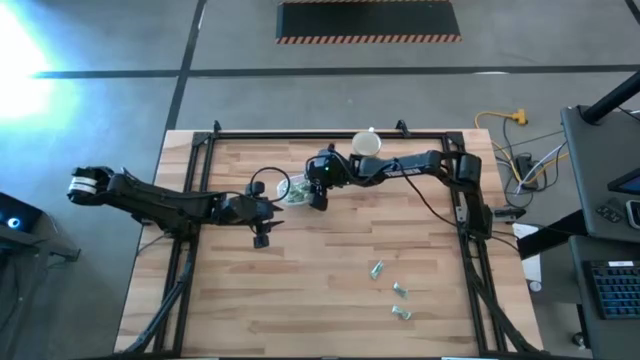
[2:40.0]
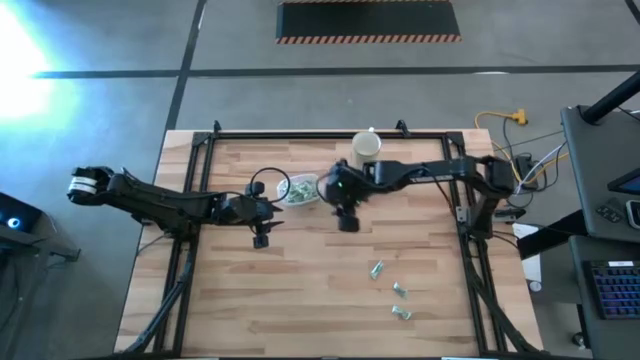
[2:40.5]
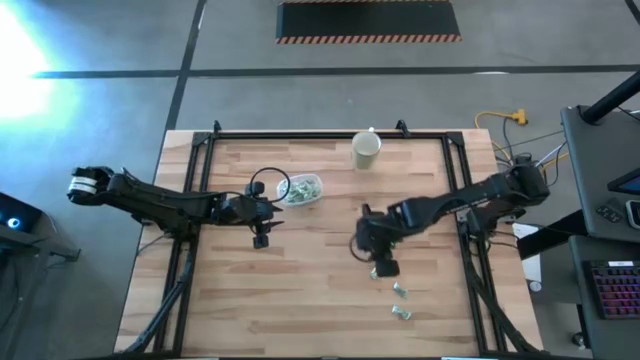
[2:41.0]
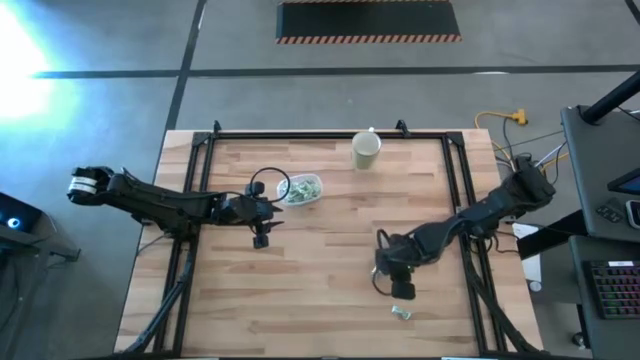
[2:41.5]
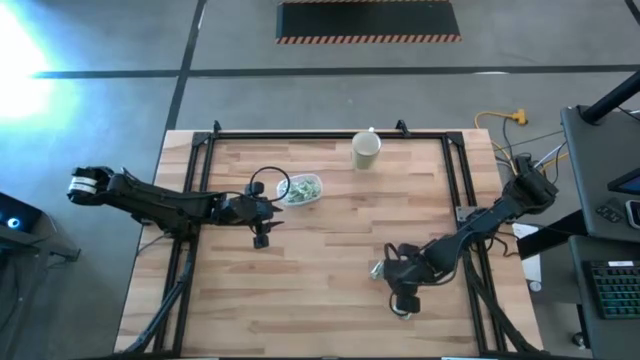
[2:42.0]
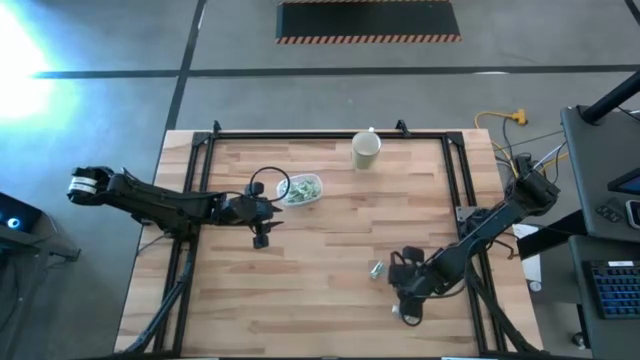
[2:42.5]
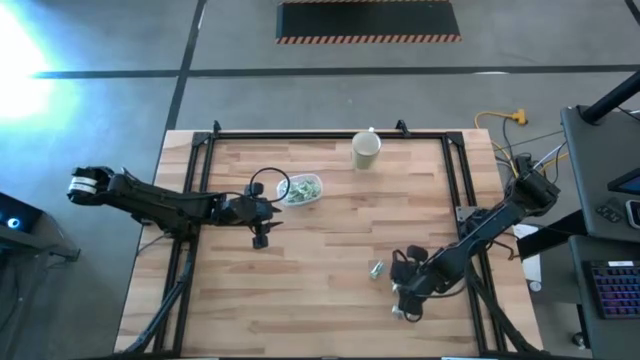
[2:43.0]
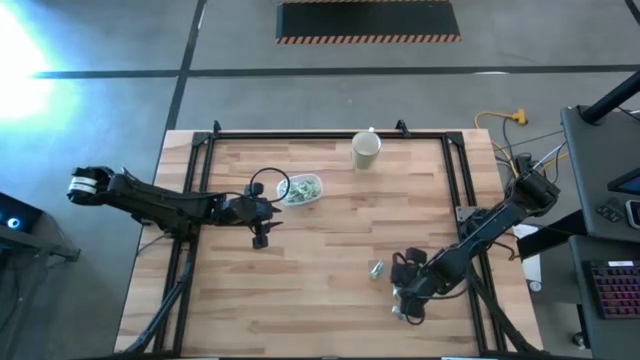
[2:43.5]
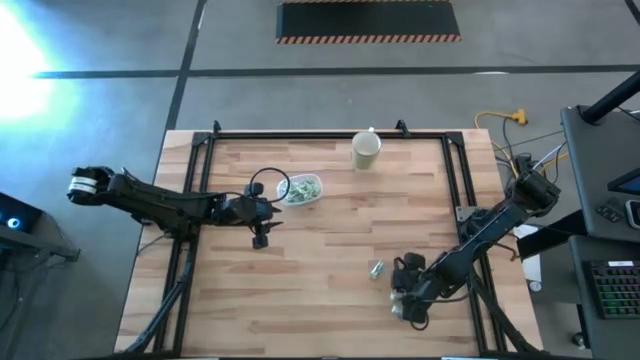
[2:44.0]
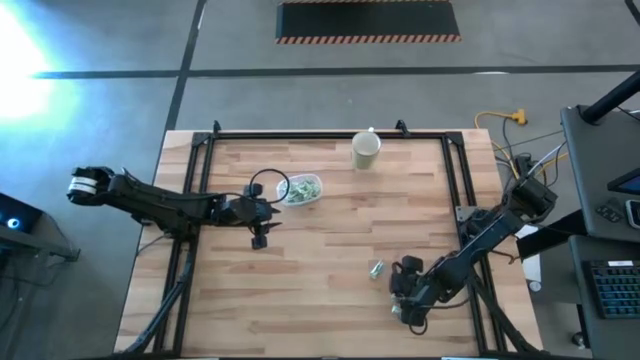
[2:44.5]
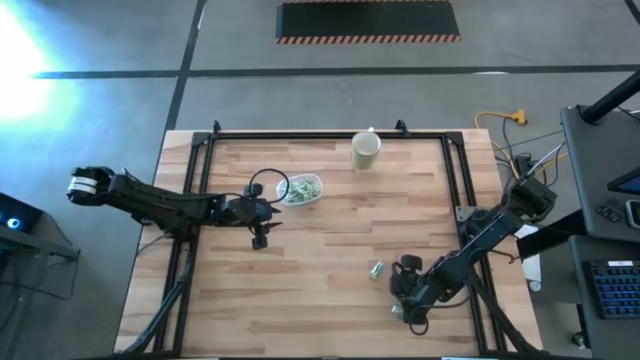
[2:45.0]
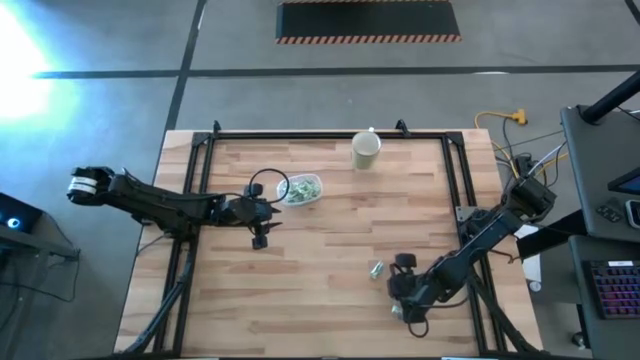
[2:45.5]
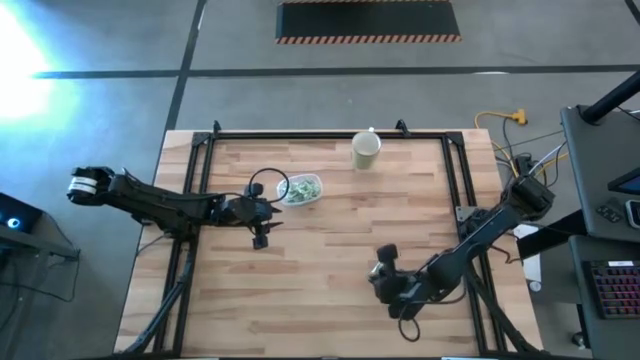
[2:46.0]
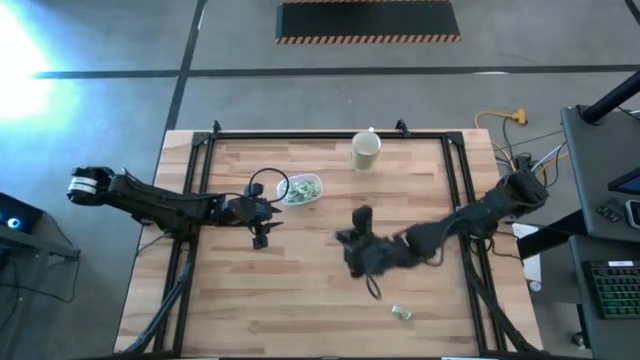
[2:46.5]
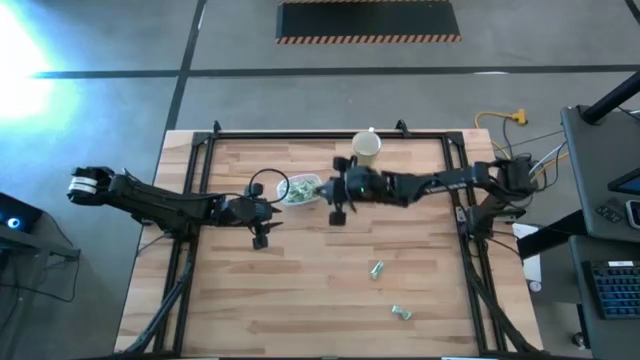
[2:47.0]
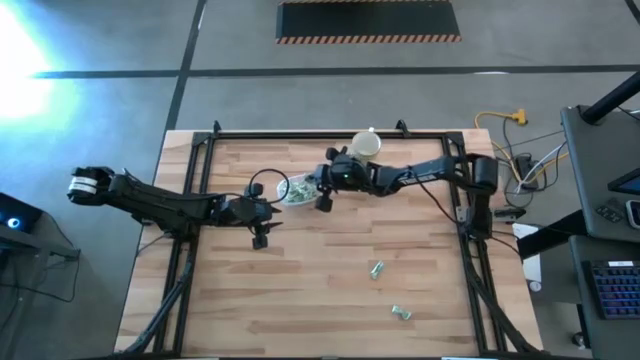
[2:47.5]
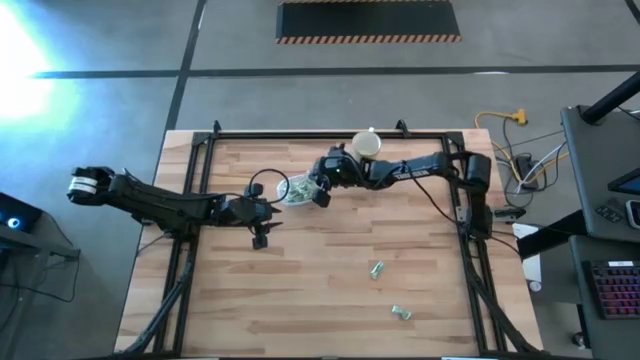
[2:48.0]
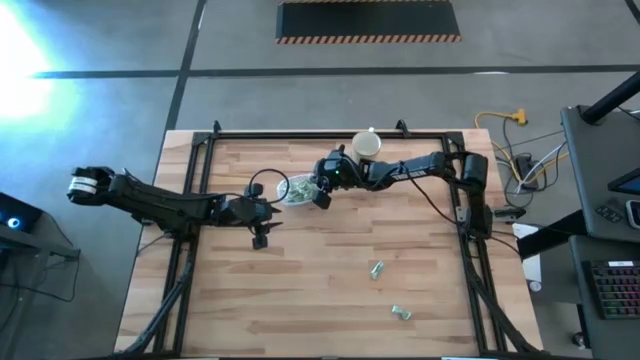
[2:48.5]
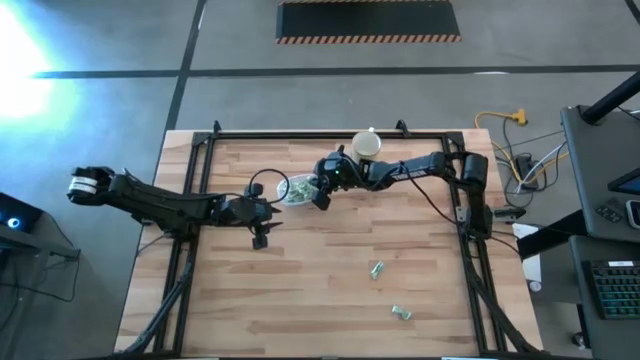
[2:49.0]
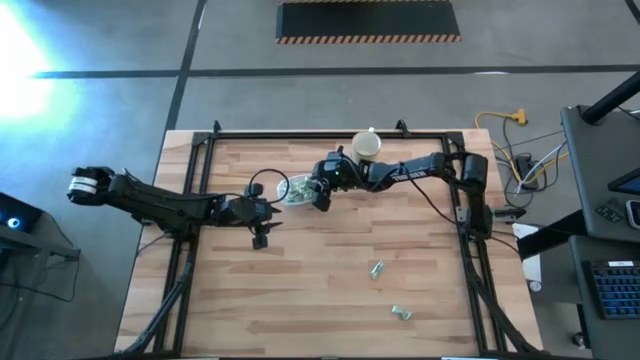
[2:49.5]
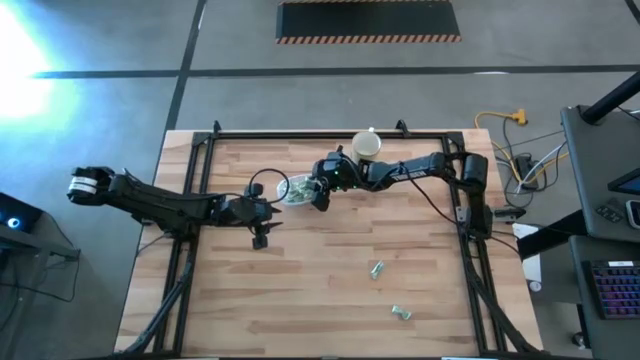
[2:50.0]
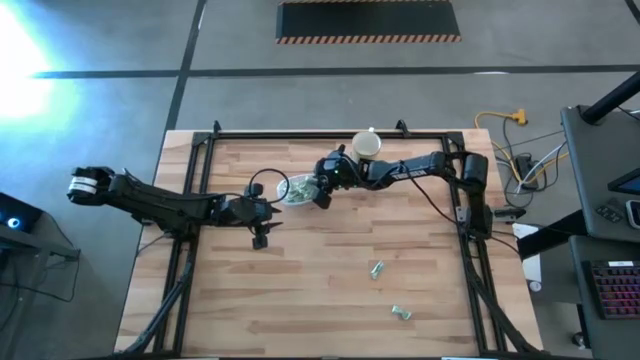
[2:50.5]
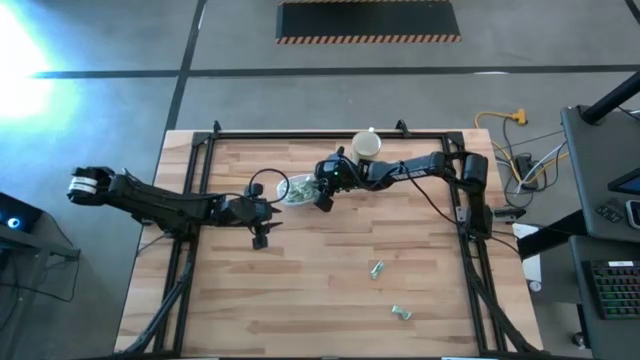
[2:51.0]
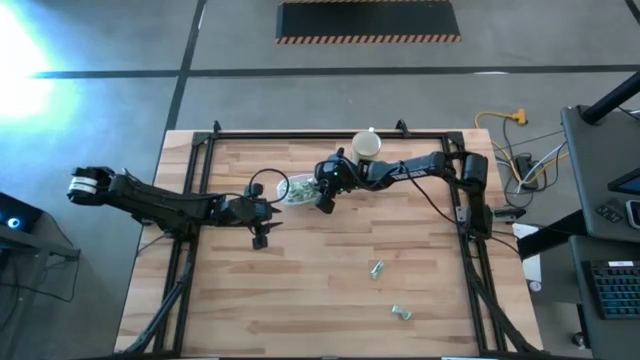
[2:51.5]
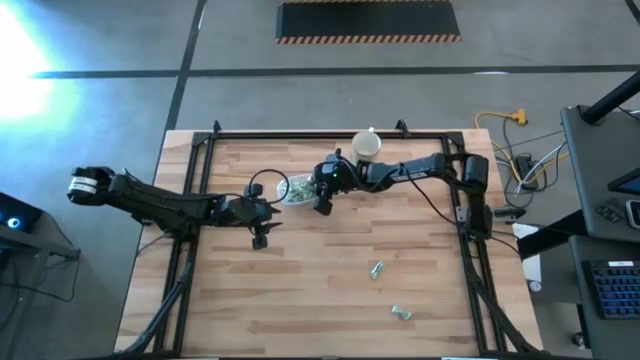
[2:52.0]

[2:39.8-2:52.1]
Task: Pick and place Stevia / Truvia into bins
Put the stevia packet into the transparent container

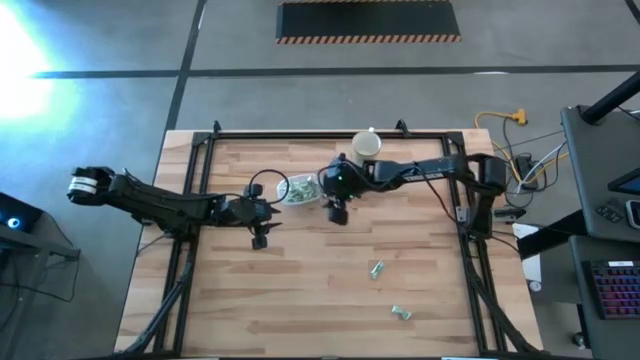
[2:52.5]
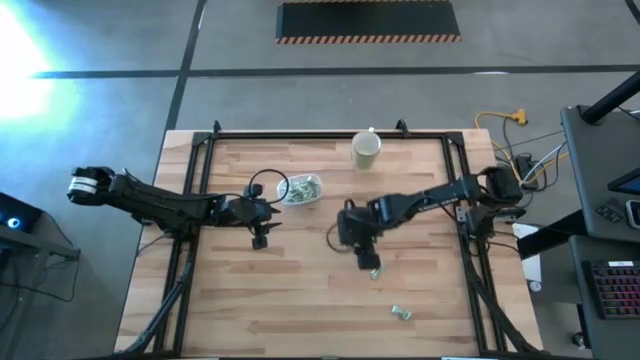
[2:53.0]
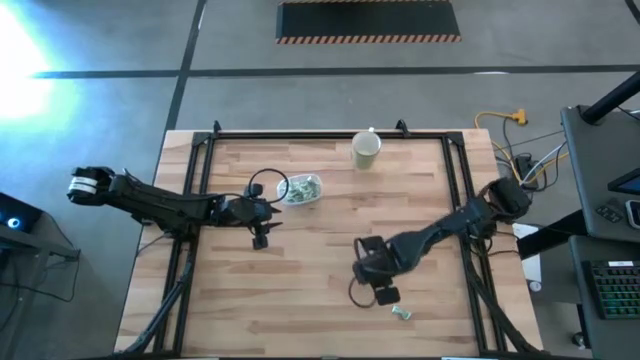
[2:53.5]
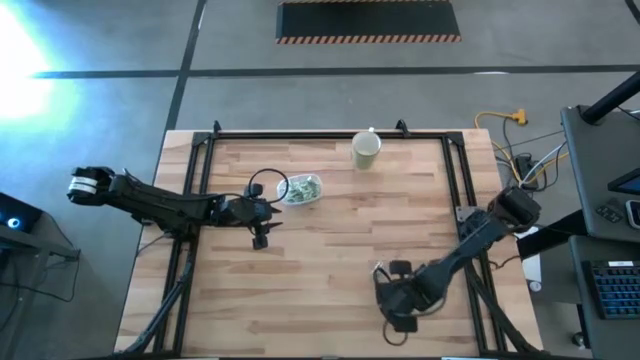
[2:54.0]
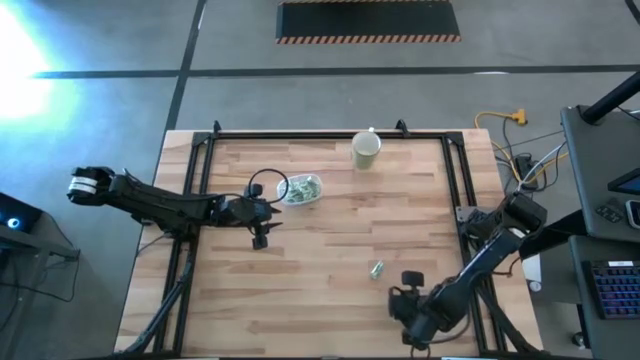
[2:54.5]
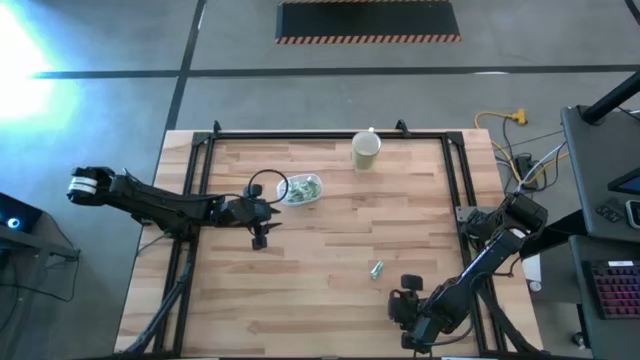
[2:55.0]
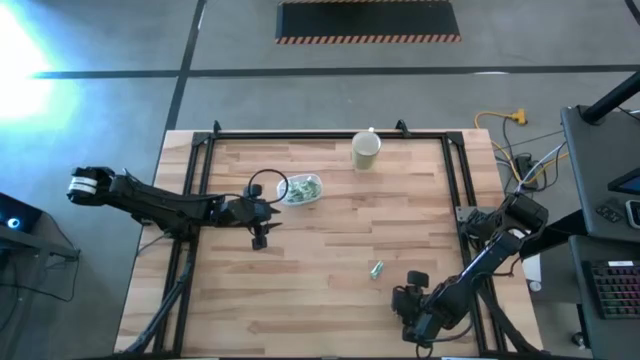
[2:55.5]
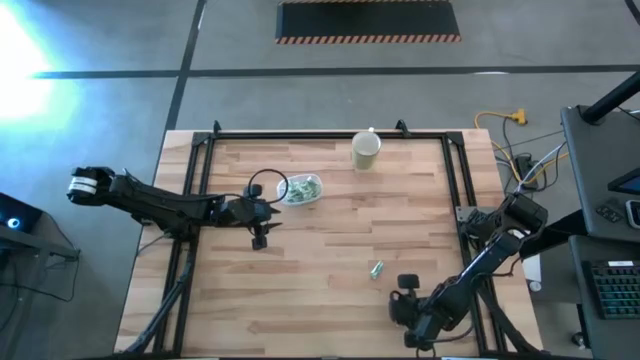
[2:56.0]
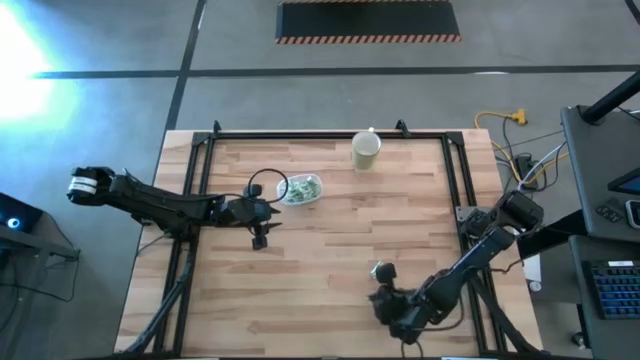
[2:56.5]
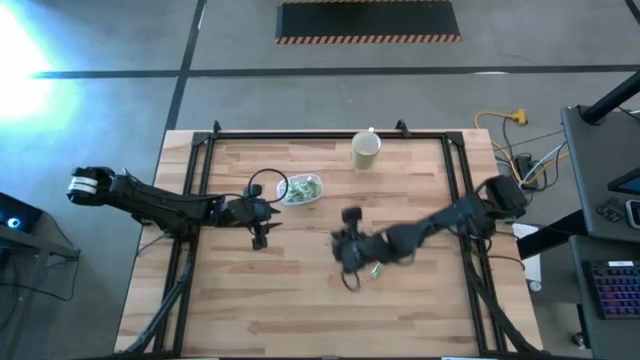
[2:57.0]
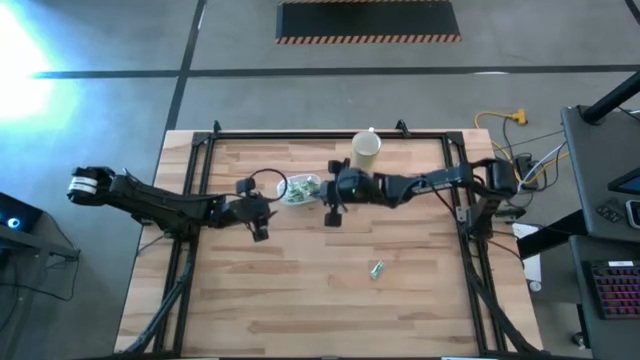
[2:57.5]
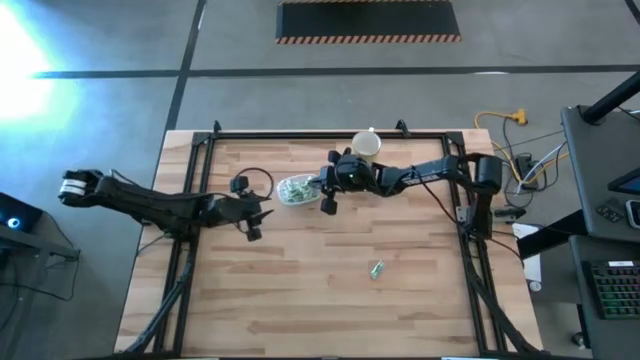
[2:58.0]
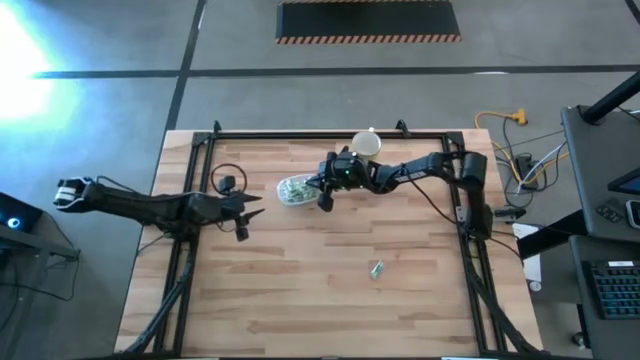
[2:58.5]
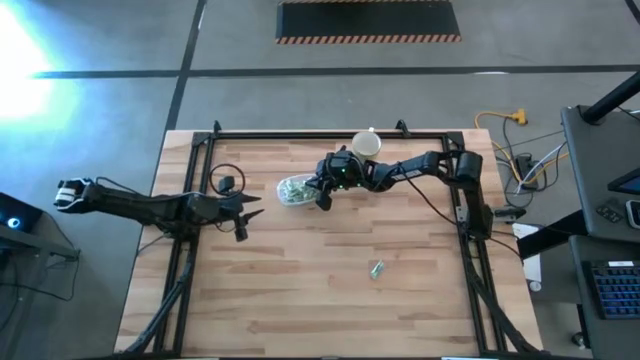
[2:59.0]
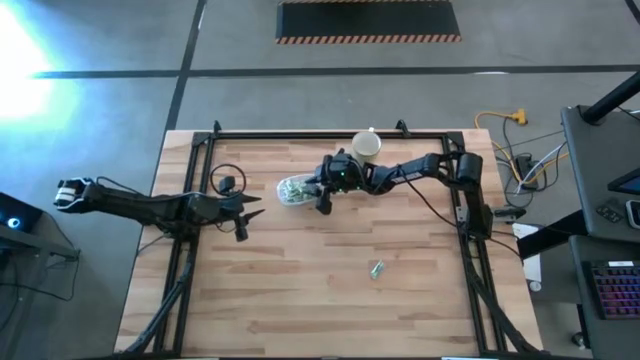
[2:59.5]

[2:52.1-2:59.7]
Put the stevia packet into the transparent container

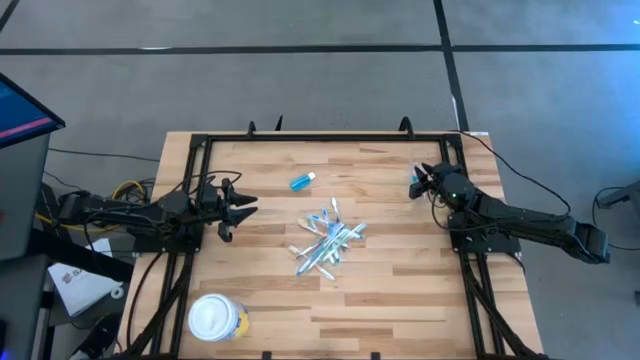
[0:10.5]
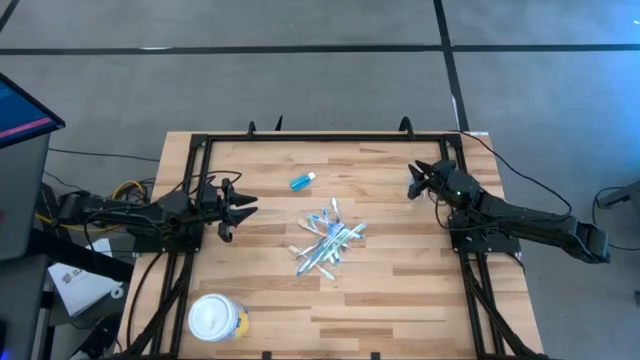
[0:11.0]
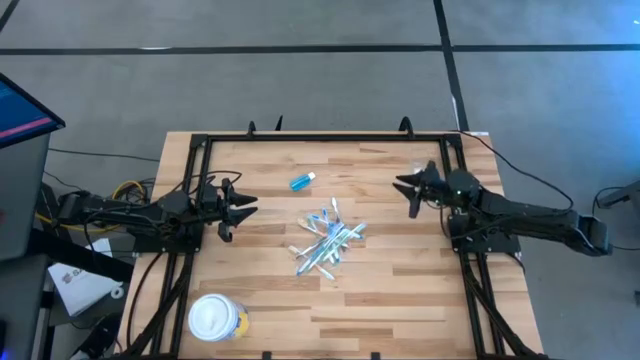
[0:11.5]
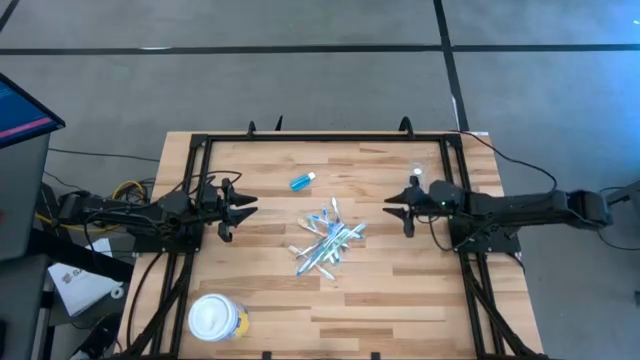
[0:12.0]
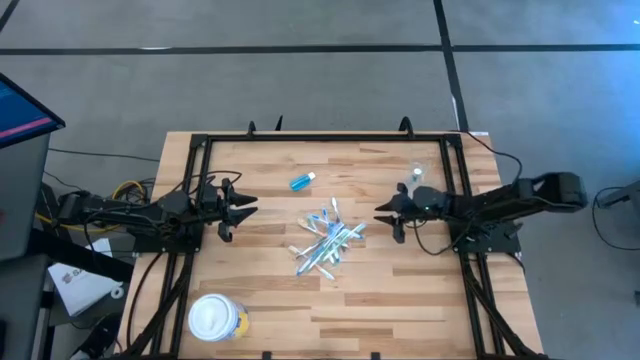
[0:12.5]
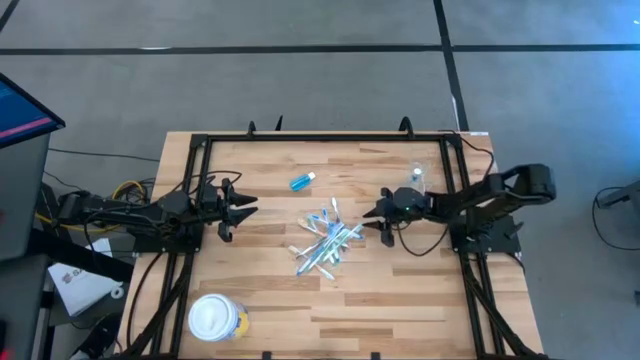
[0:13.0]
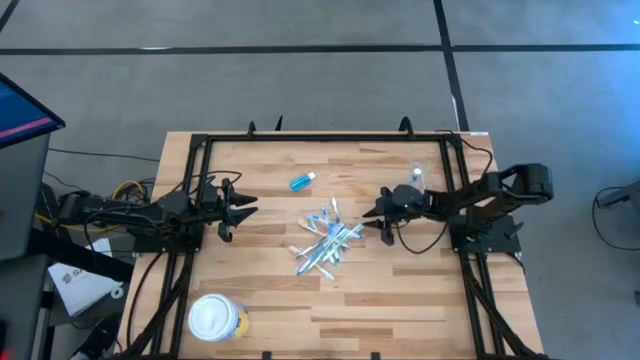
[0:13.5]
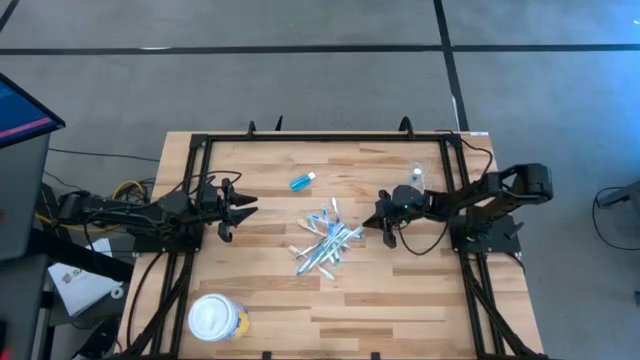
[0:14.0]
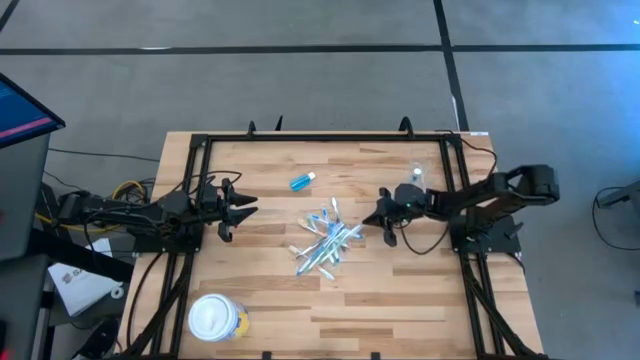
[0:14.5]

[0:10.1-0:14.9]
Task: Pick & Place toothbrushing station
Put the green toothbrush into the transparent organizer
